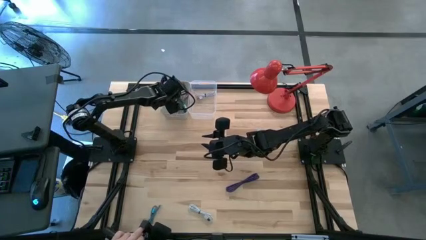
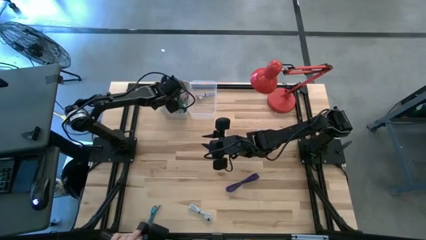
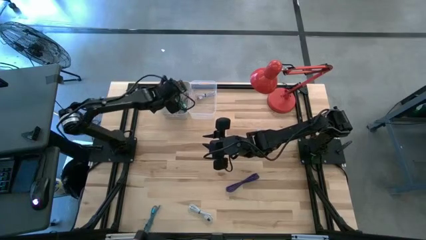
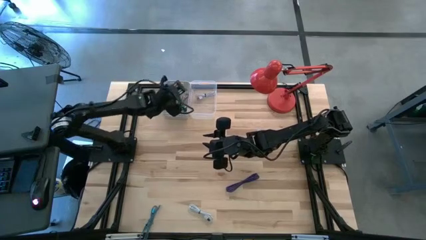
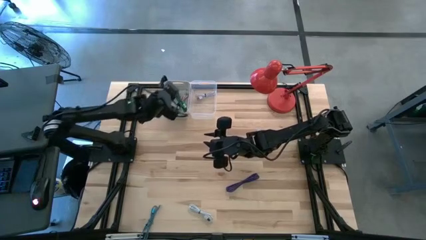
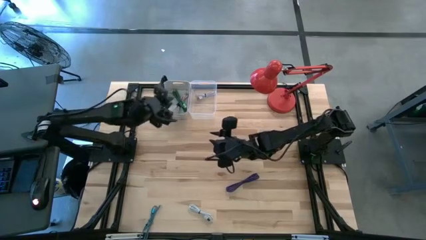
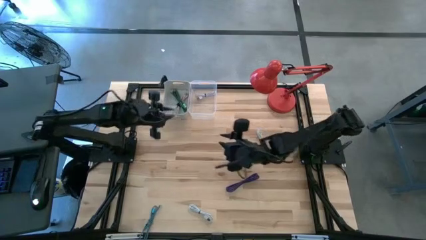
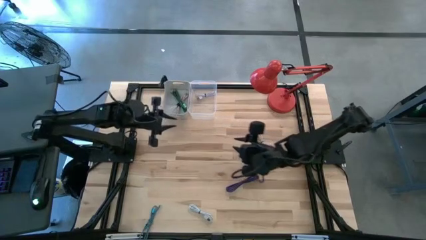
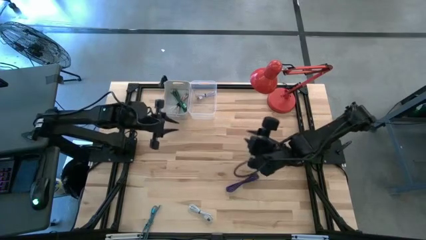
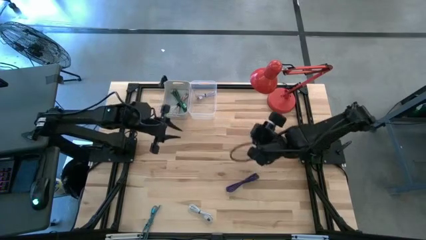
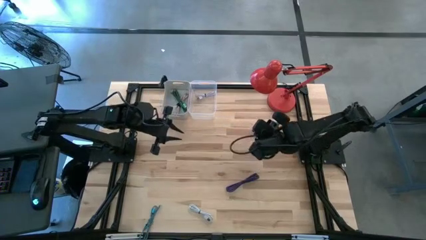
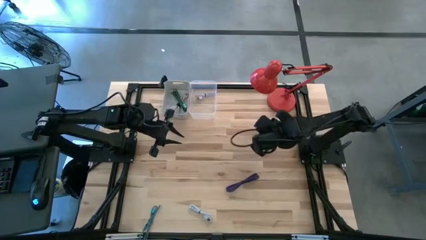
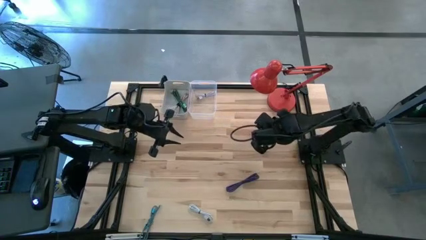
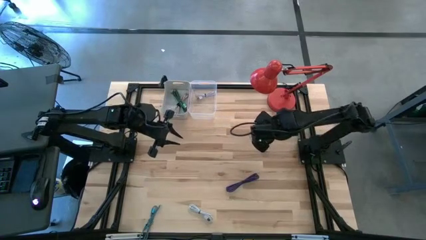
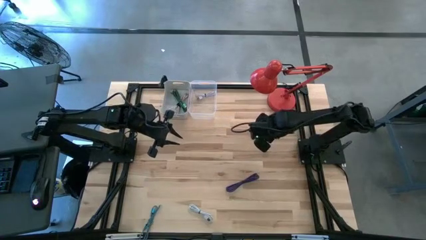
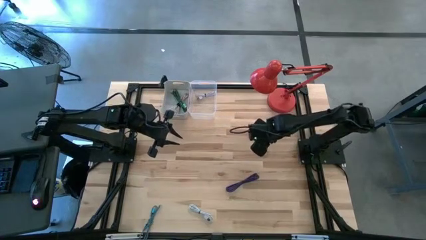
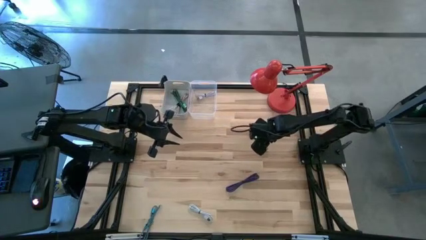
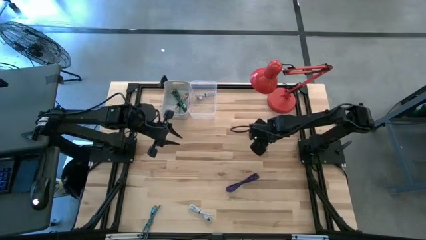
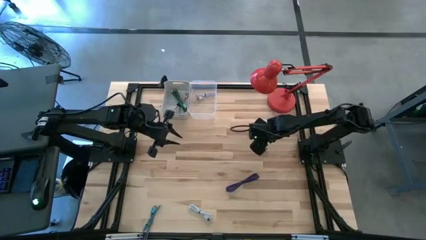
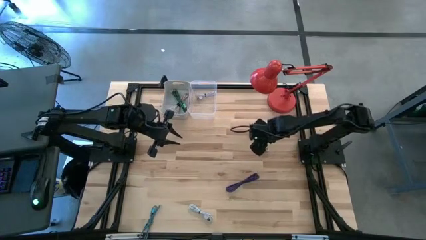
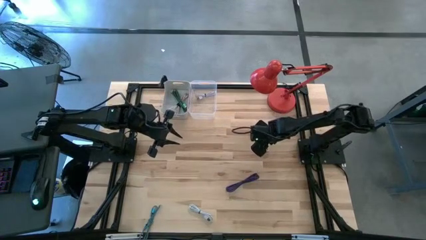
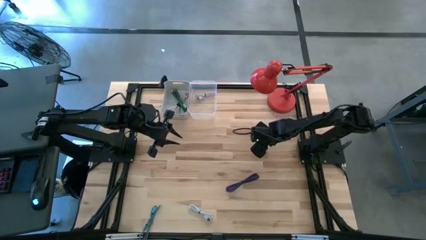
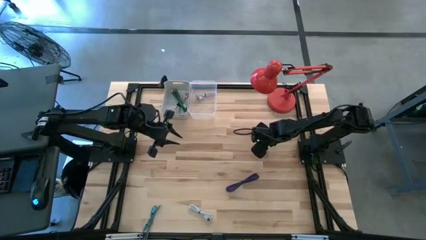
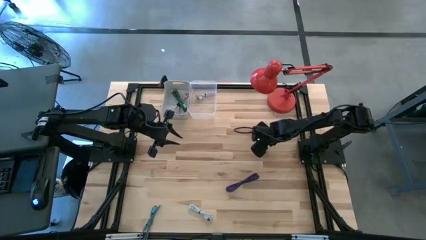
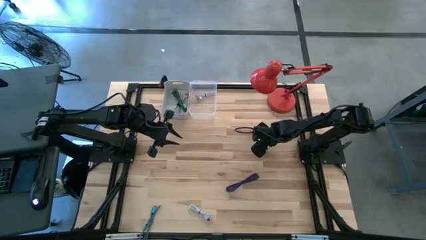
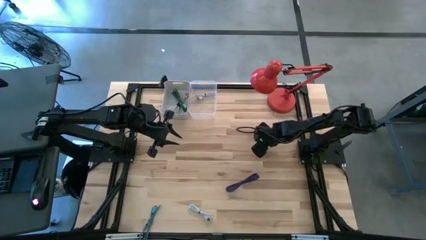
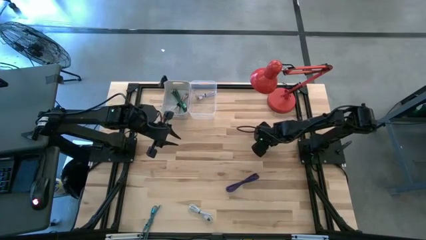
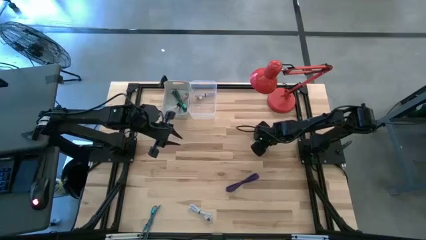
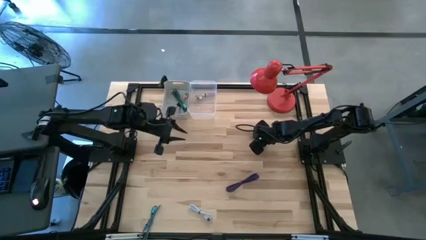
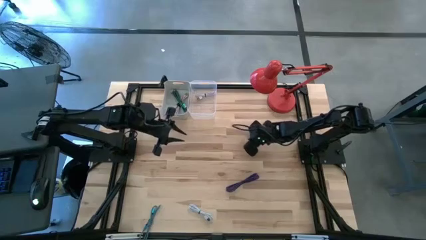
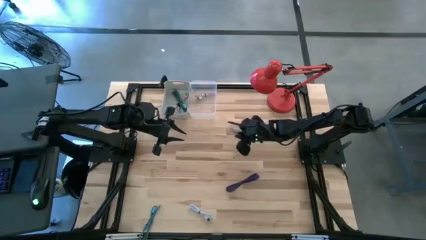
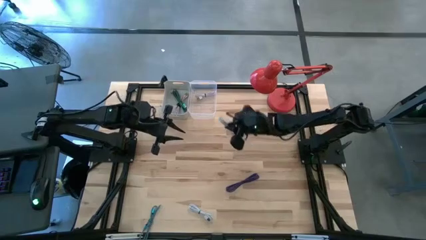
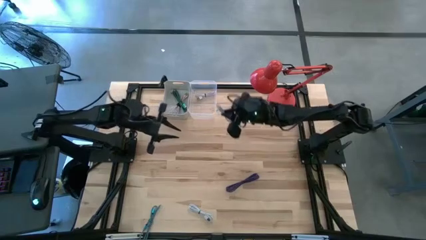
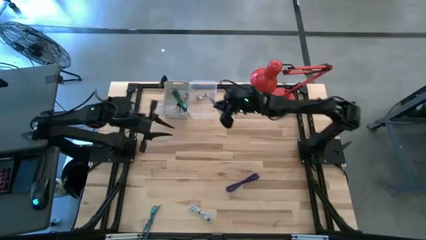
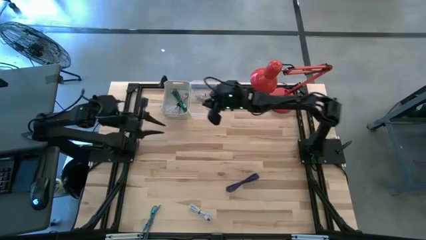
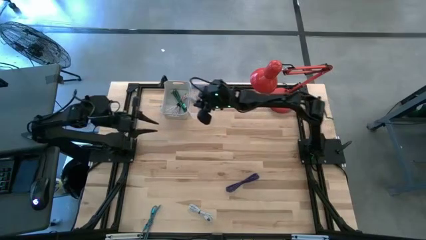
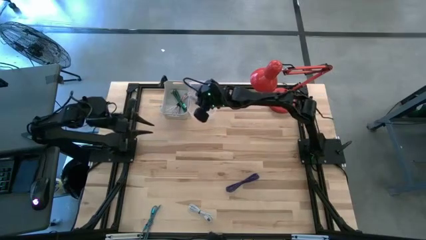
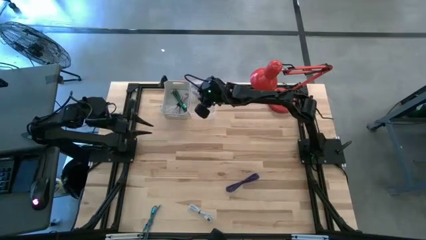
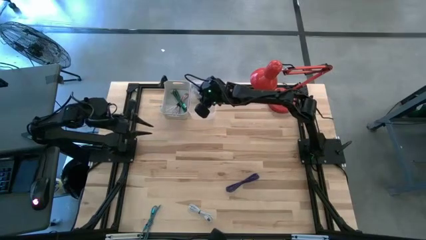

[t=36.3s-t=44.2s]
Task: Pick & Place USB Port
Put the light blue charger cable into the transparent bin

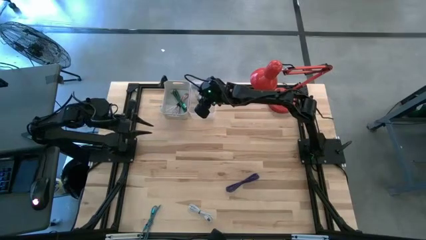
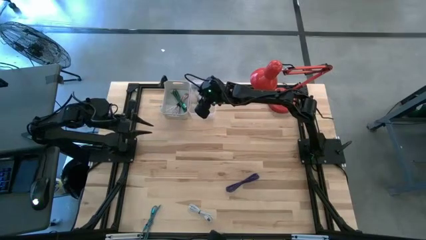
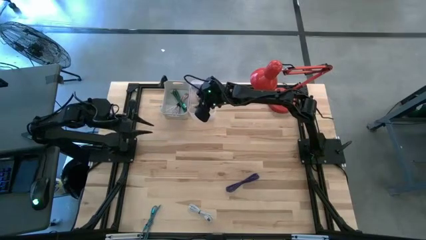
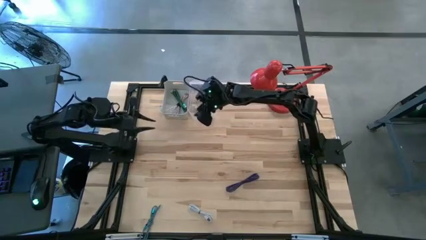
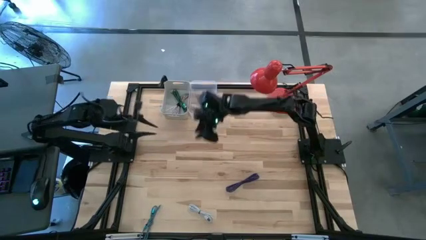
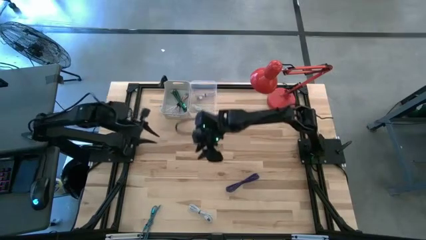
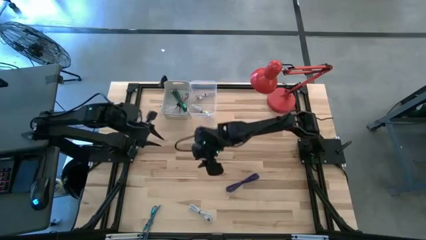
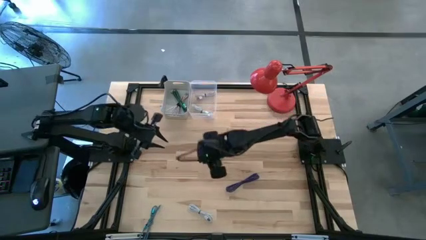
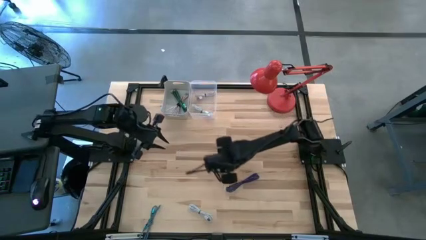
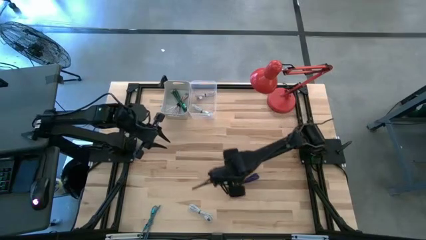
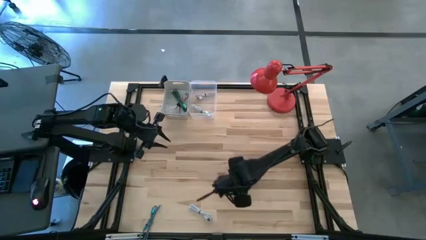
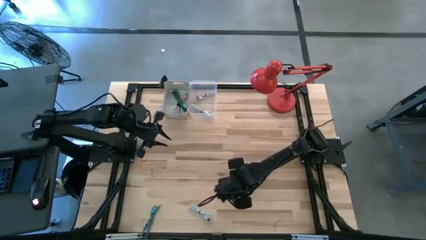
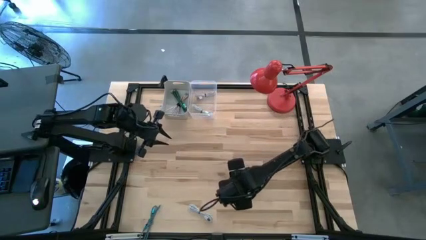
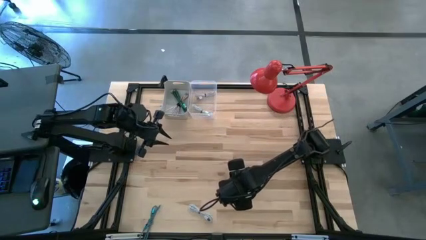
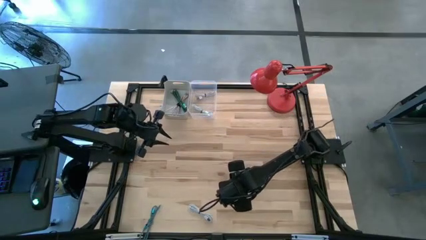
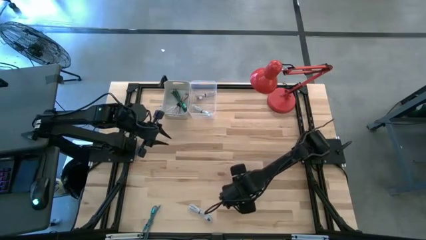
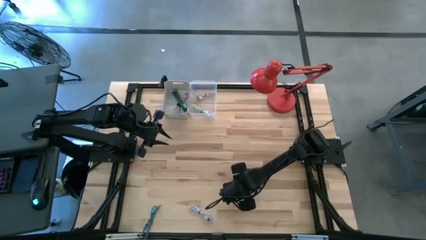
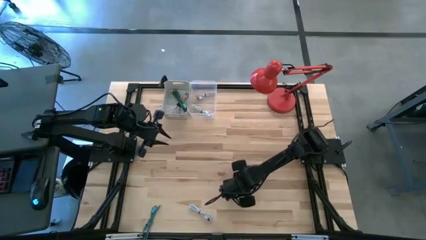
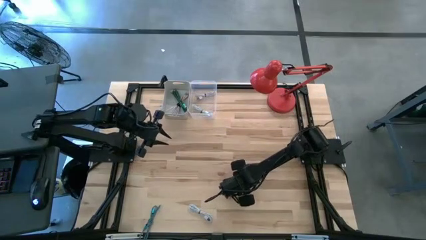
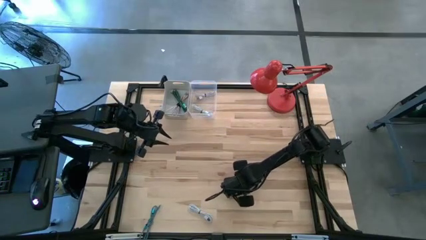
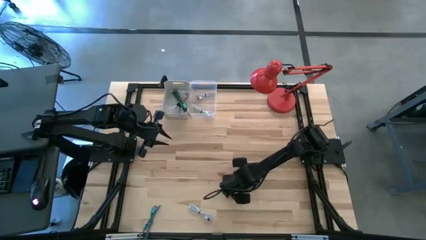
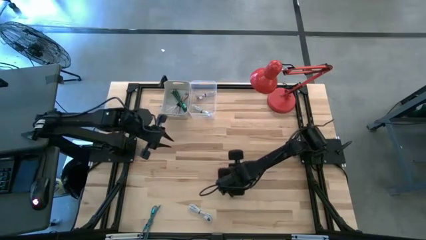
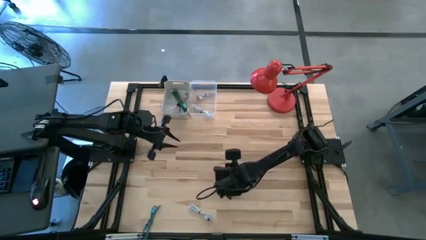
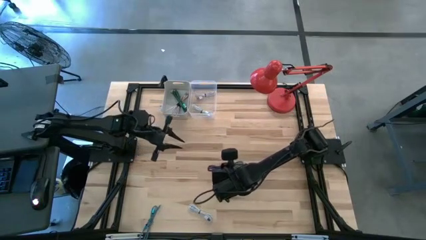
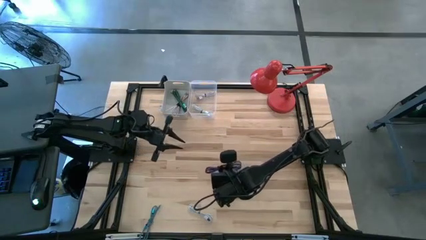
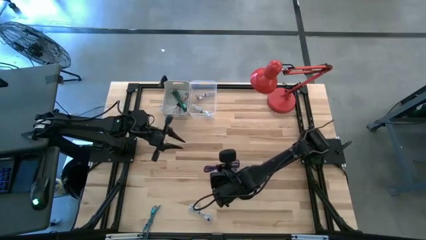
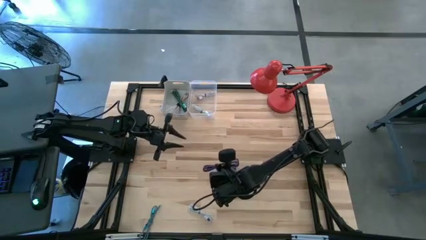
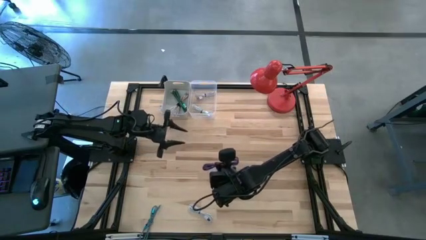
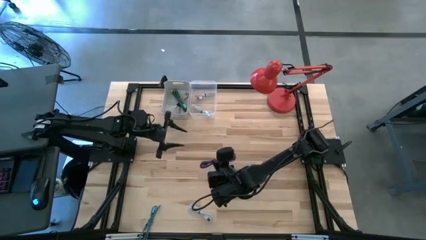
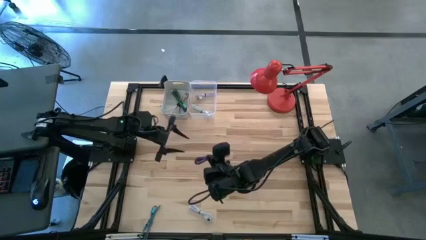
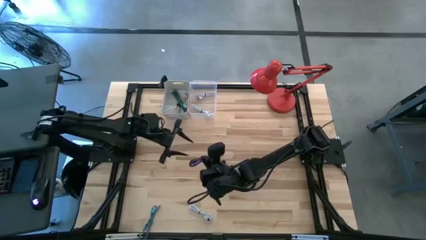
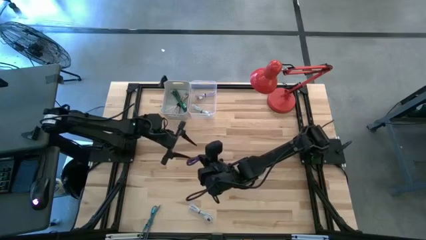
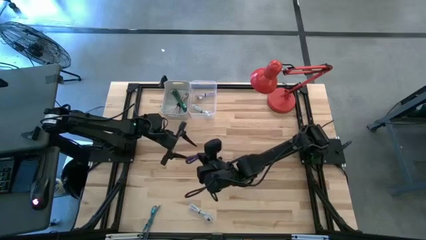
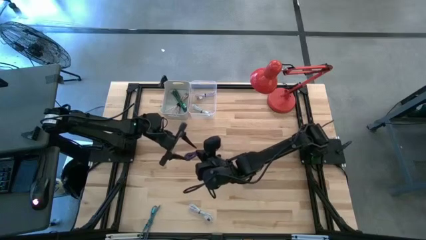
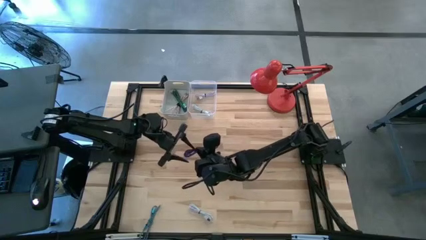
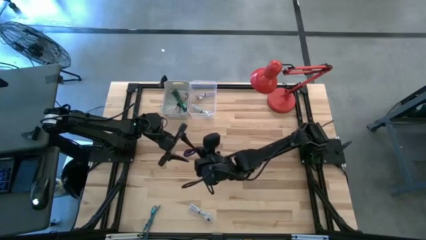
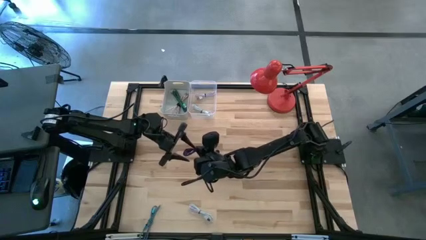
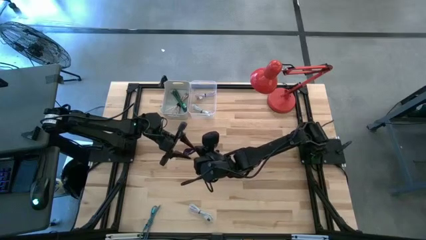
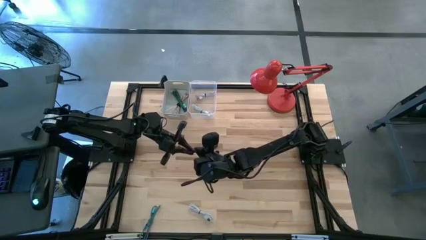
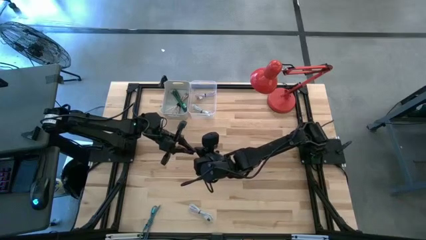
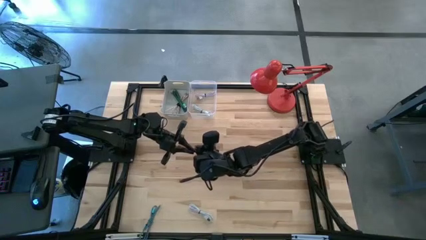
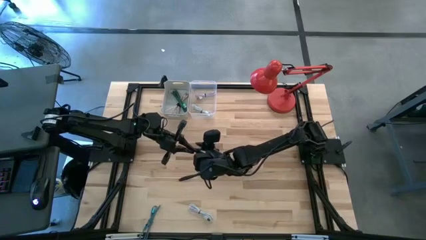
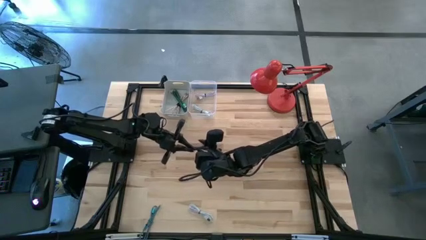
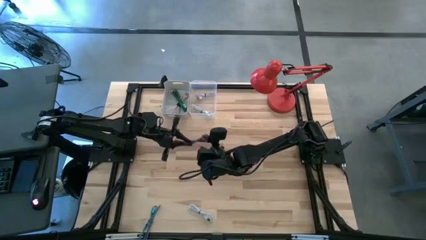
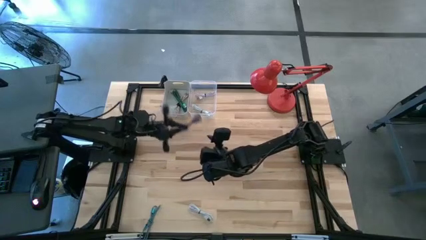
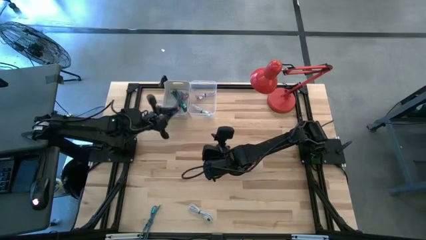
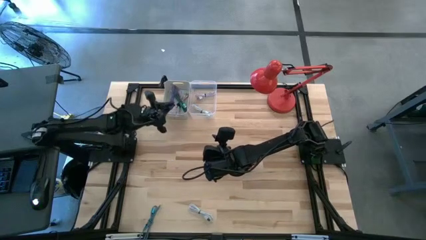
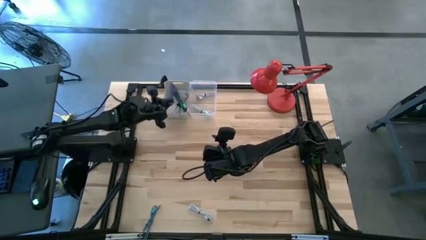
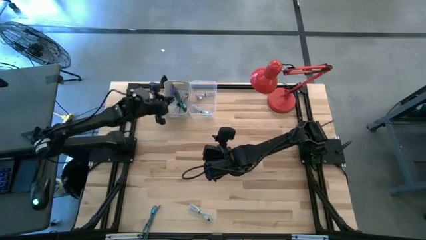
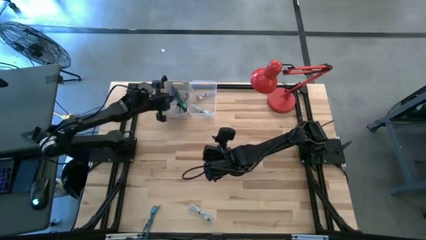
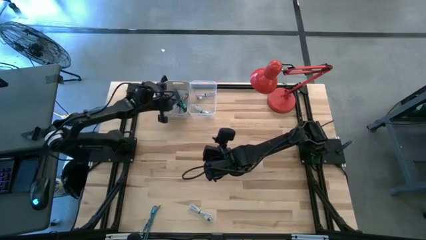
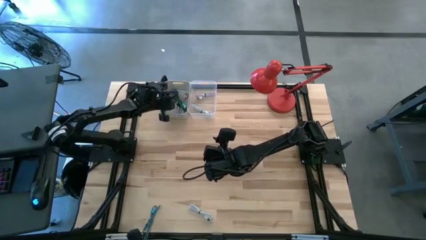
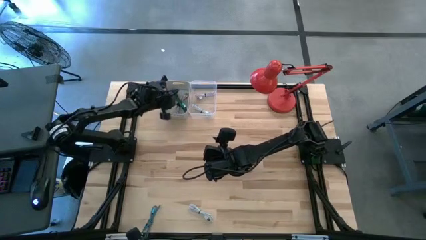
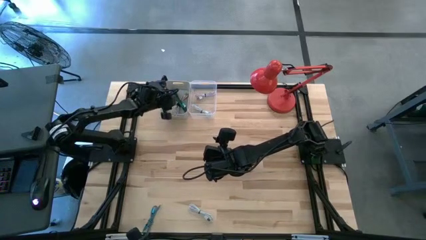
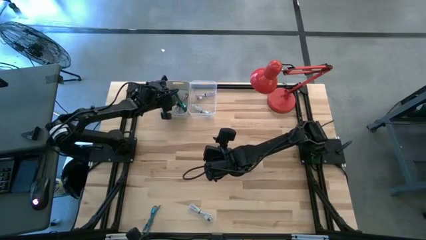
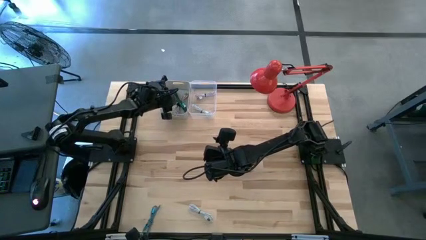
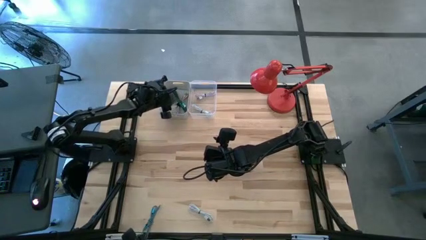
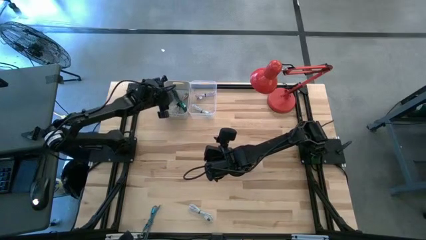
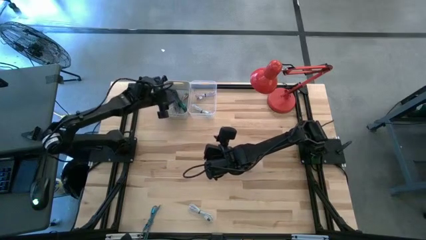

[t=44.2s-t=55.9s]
Put the violet patterned charger cable into the gray bin
